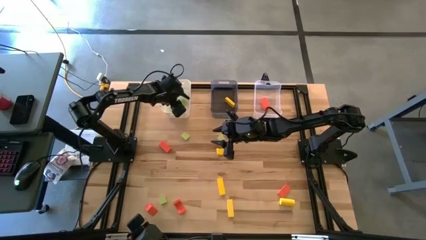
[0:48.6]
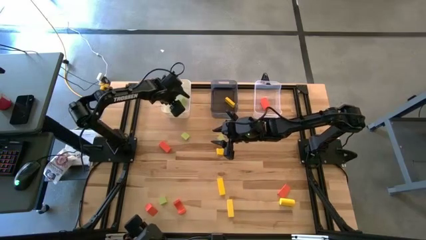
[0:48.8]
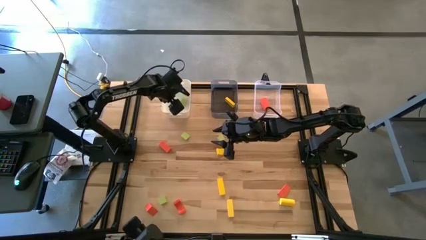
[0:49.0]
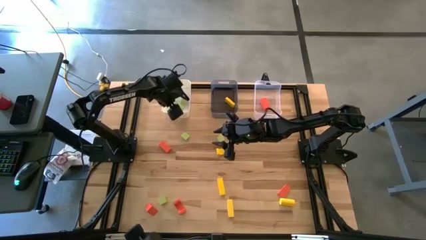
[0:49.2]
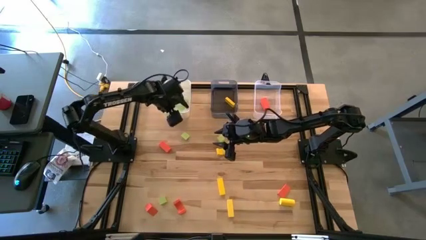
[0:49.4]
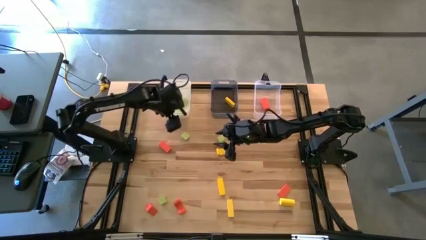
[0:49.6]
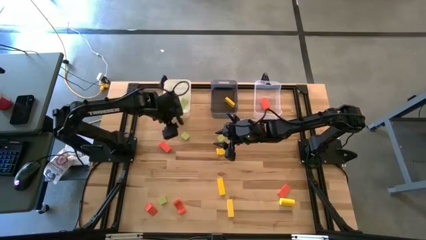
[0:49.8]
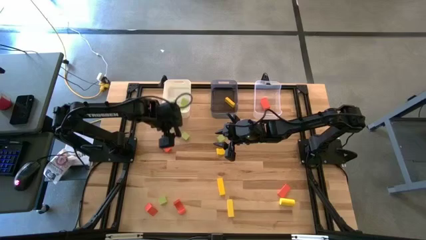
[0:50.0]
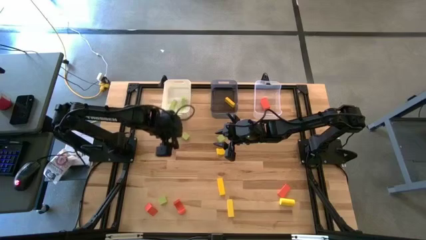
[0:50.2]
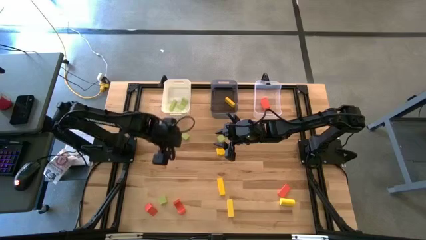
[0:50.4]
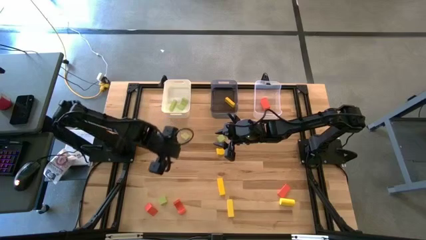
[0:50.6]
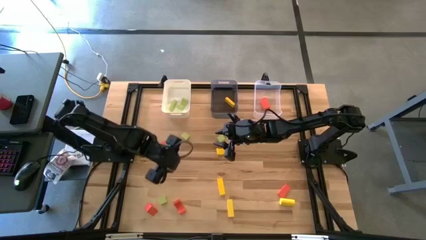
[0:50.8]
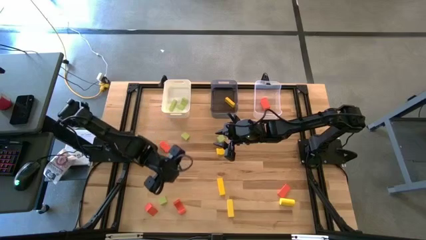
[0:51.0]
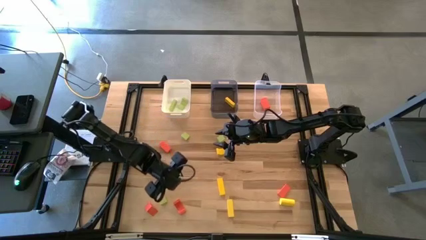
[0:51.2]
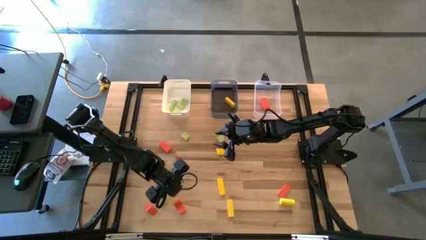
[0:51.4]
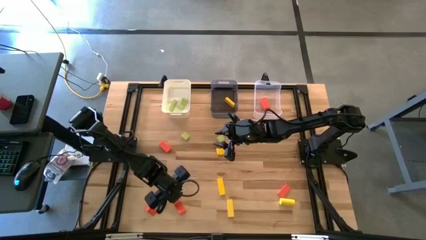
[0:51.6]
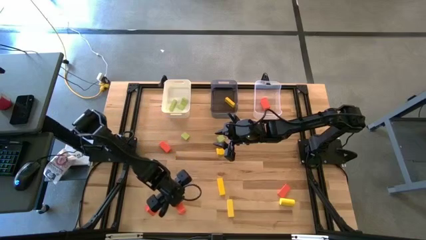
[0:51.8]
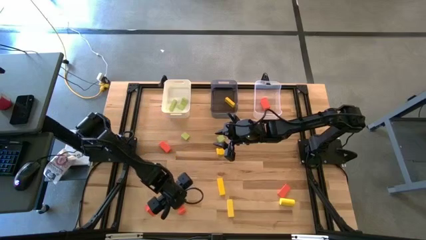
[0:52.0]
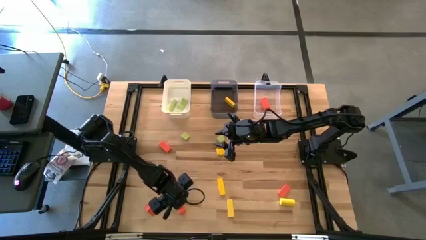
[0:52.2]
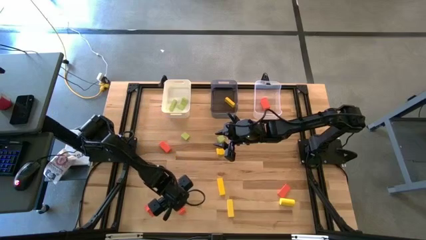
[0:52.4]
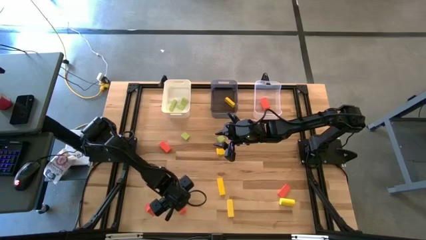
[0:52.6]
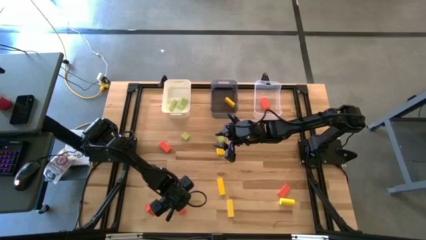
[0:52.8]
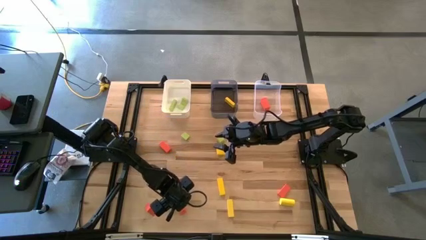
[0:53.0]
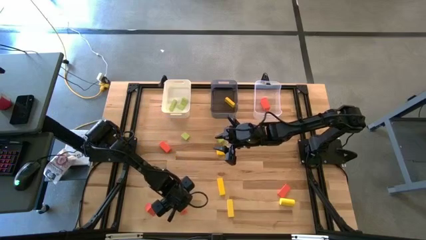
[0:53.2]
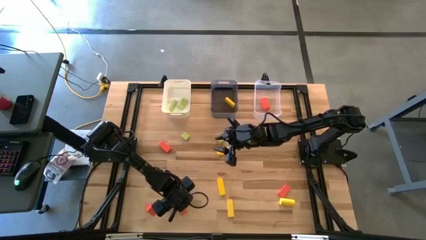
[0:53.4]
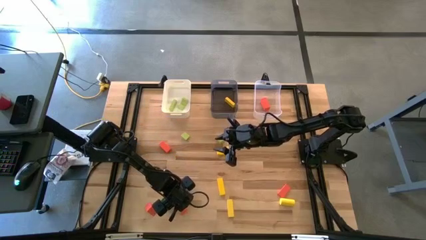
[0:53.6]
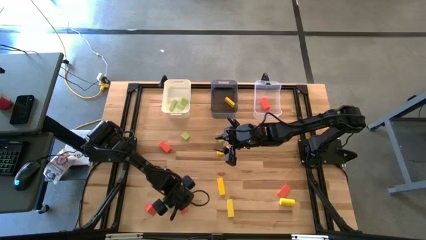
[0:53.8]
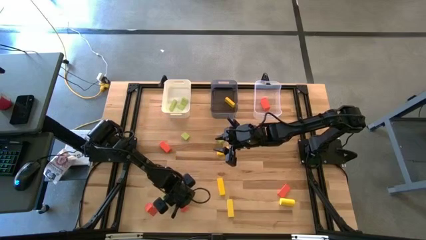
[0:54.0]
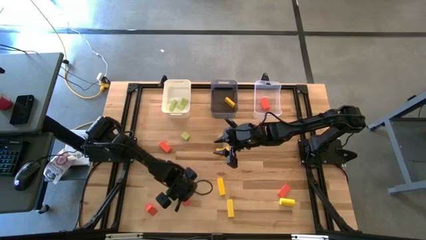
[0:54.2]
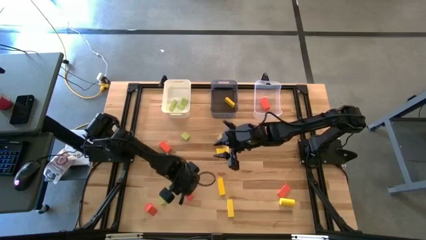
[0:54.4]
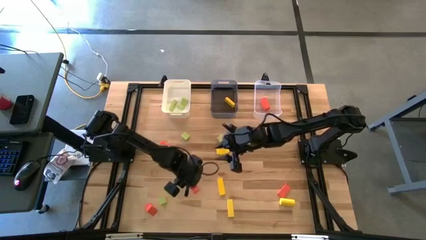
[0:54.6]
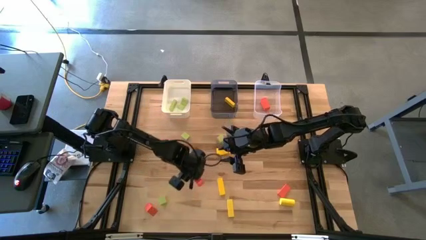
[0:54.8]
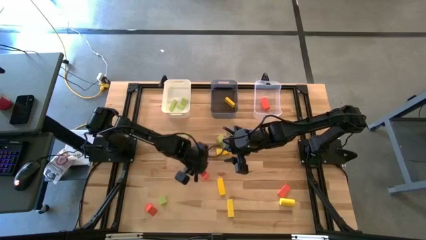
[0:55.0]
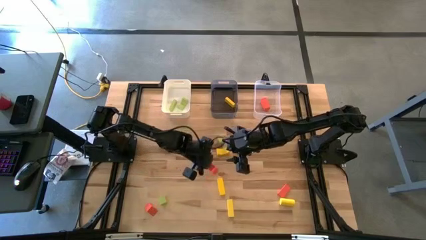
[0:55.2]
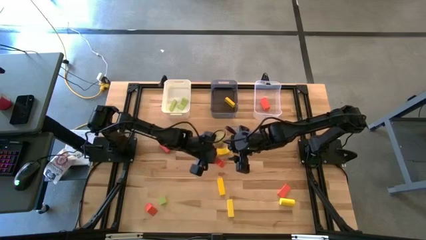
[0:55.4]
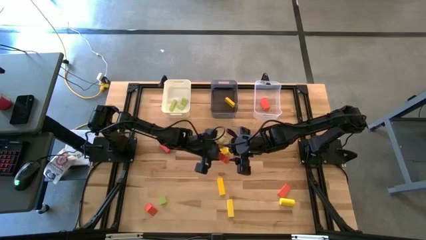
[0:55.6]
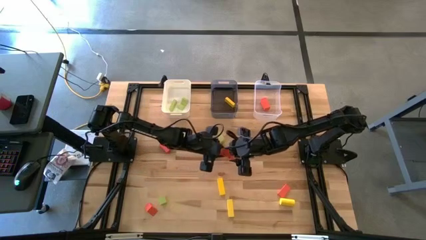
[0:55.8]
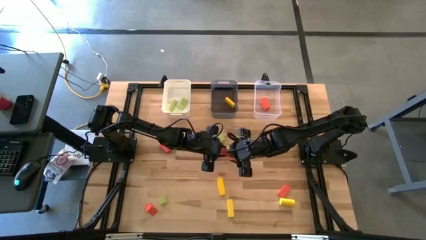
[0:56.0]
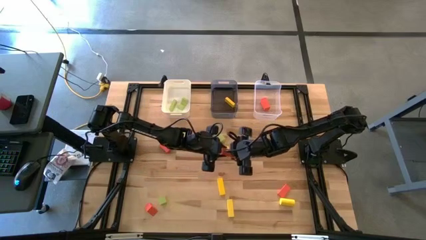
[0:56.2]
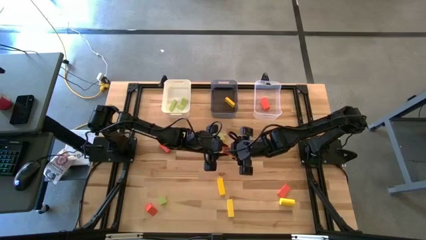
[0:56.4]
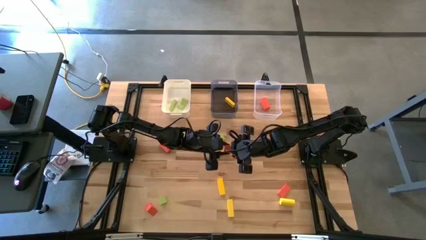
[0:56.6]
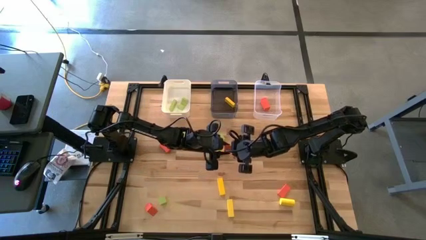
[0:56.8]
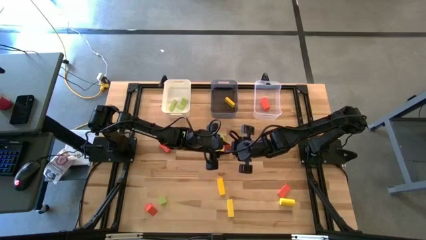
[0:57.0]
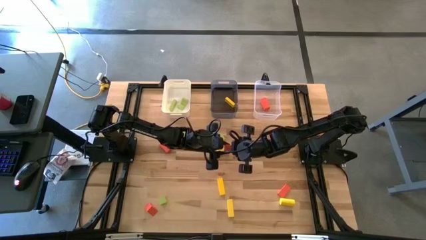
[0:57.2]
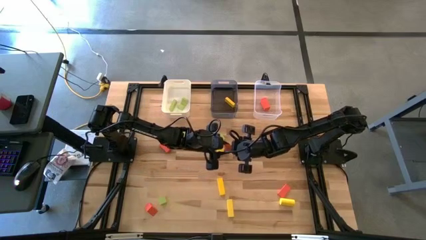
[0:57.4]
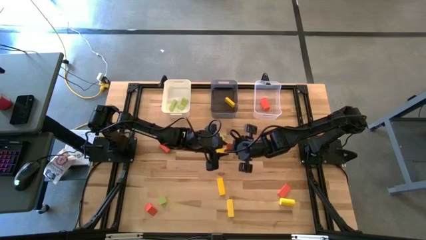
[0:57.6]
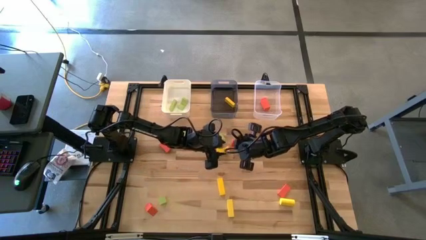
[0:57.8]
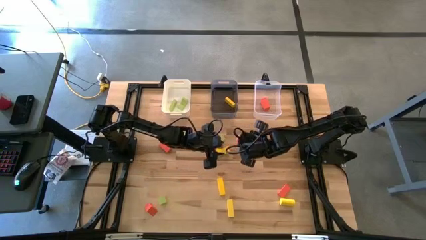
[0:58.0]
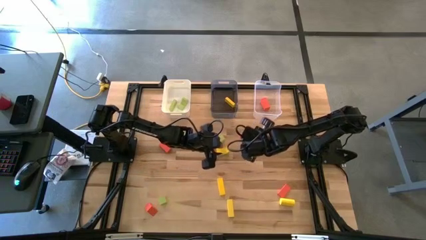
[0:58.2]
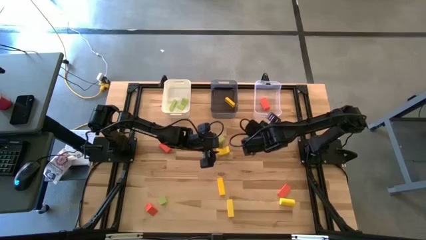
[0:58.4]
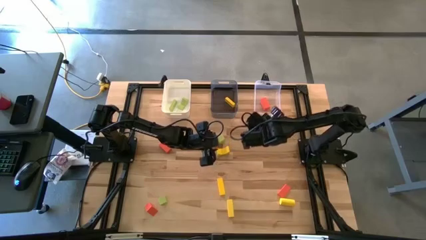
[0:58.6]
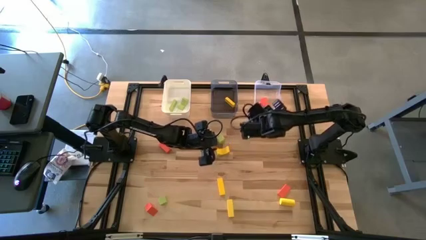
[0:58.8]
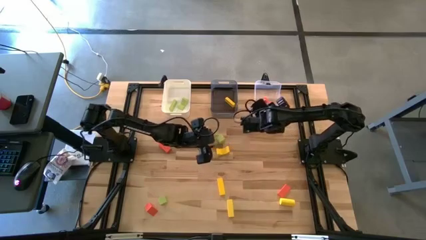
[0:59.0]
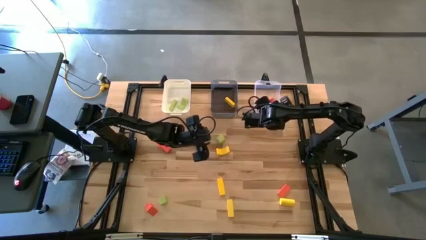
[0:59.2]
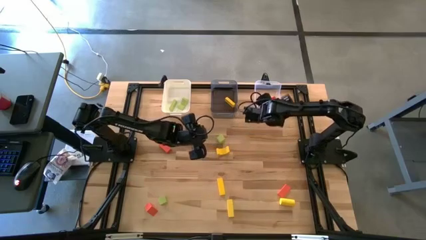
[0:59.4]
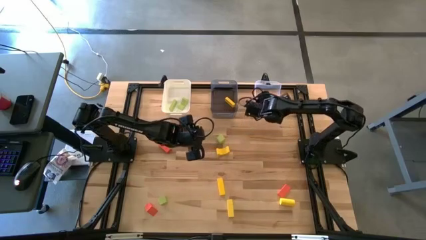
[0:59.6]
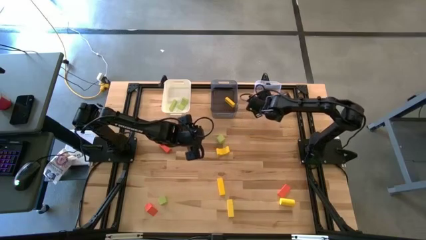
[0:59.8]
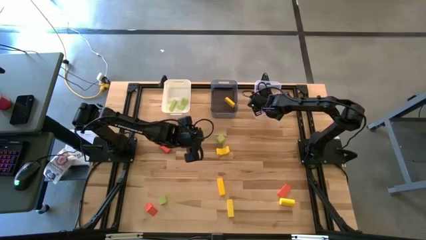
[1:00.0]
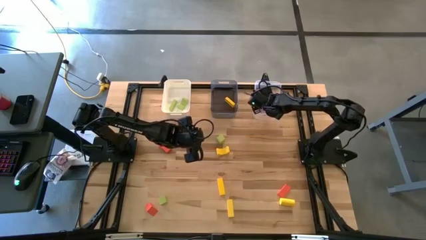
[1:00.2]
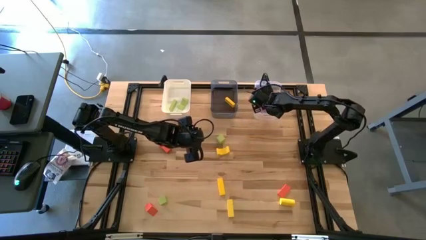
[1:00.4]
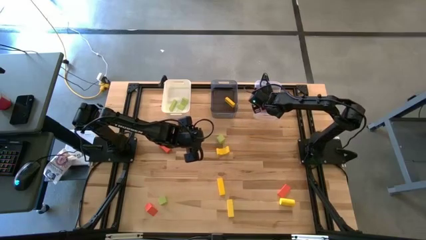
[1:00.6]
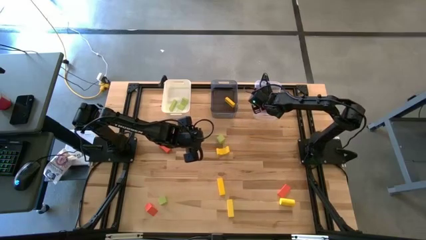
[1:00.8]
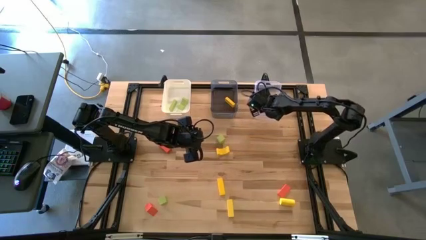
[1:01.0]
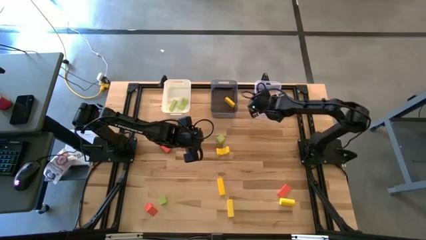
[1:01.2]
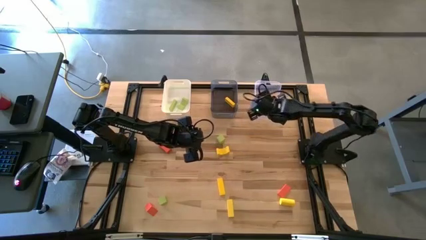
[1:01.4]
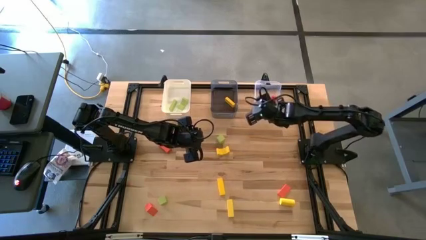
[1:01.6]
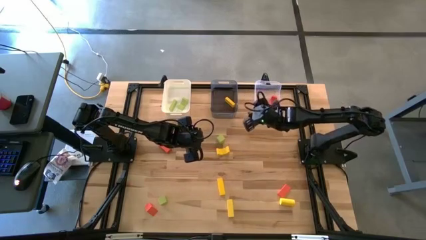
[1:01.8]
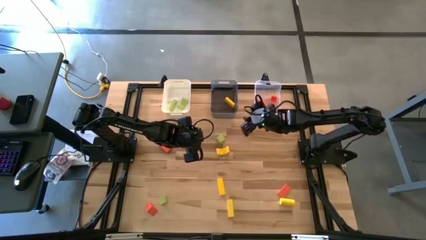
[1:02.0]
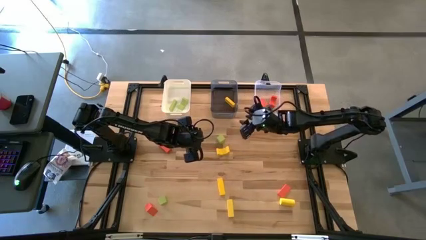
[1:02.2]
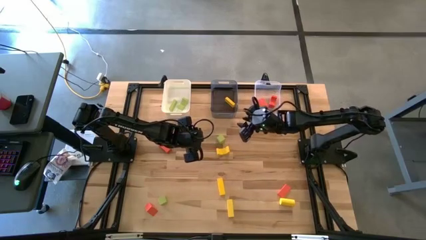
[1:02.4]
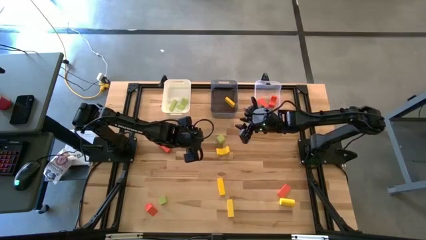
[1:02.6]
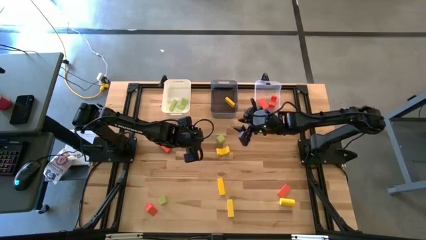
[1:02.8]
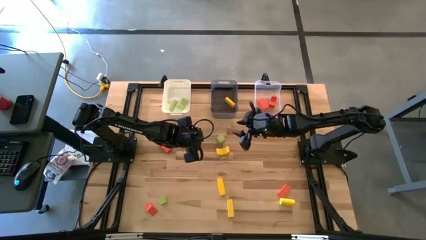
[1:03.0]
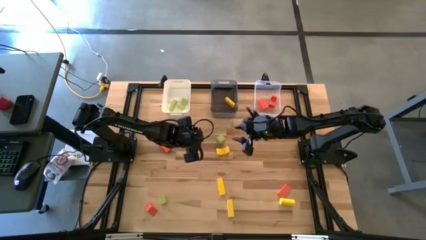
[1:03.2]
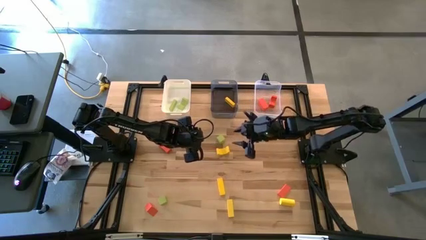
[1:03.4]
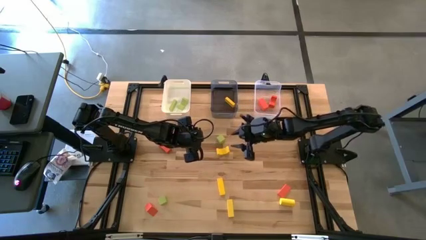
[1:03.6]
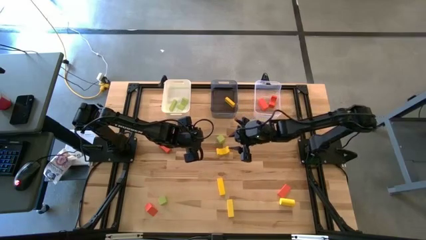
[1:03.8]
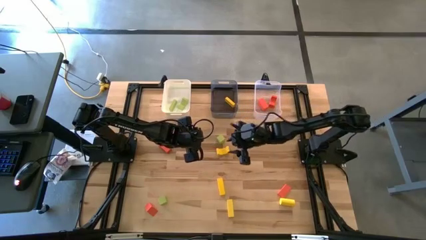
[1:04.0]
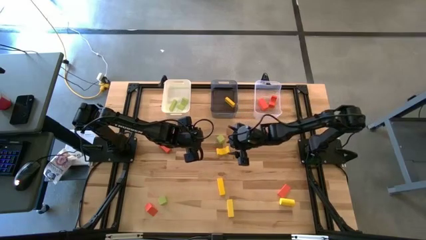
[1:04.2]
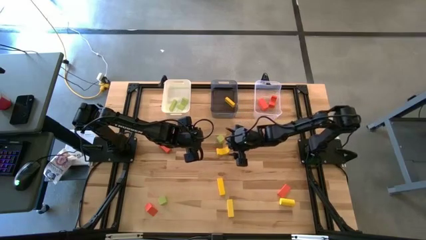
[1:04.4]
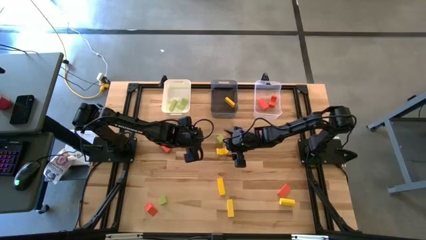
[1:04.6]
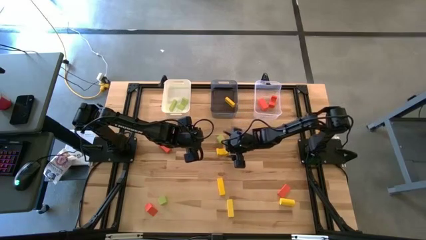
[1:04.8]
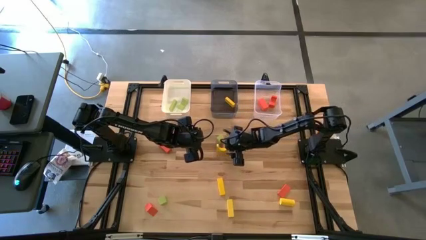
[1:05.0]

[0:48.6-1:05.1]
Task: Sort & place blocks by color
Put the orange block into the transparent bin
